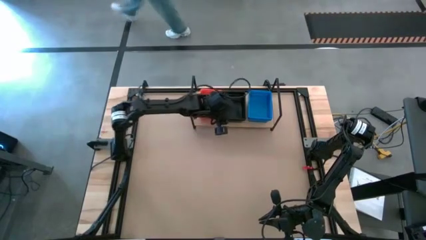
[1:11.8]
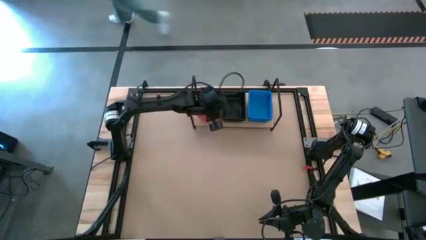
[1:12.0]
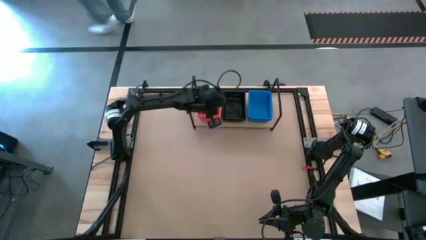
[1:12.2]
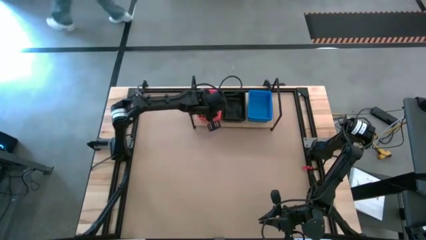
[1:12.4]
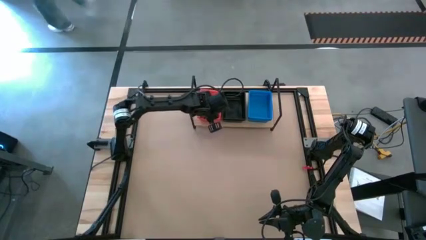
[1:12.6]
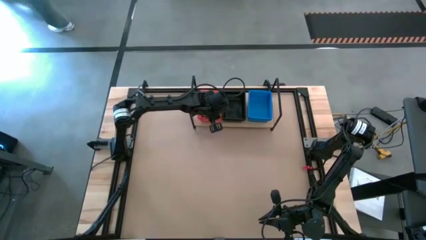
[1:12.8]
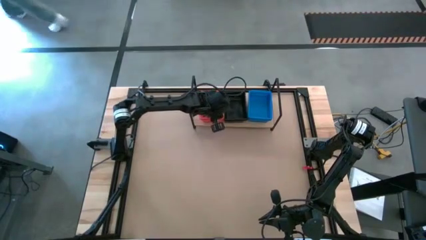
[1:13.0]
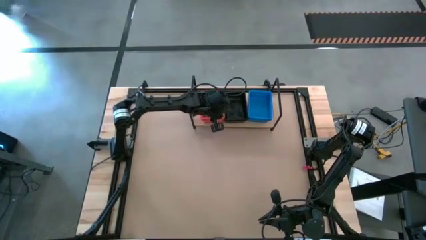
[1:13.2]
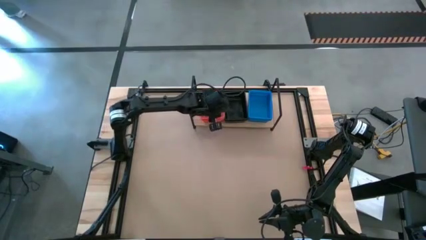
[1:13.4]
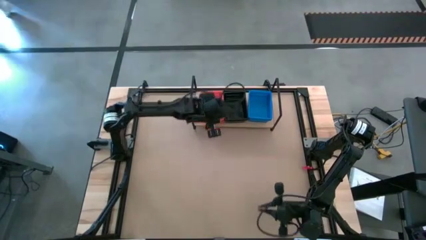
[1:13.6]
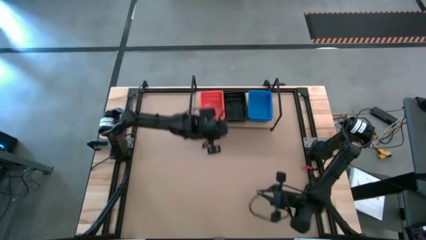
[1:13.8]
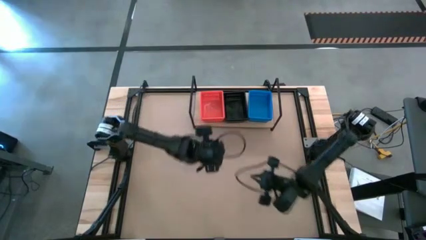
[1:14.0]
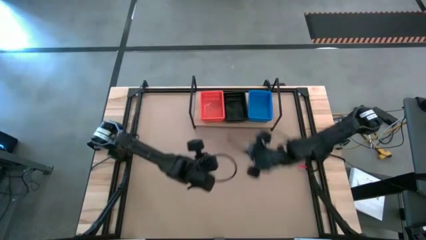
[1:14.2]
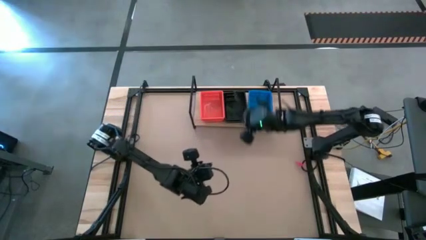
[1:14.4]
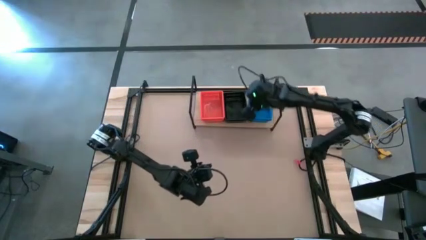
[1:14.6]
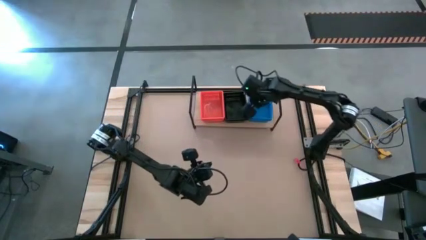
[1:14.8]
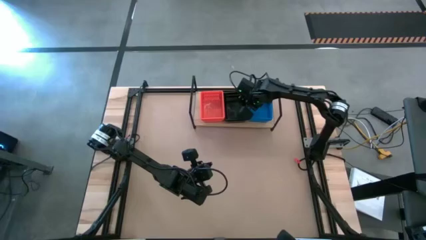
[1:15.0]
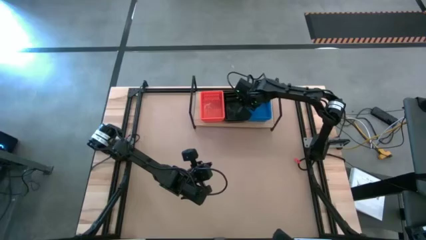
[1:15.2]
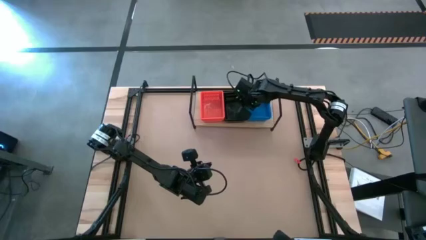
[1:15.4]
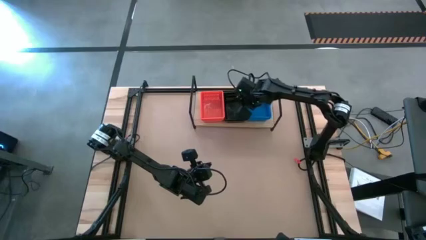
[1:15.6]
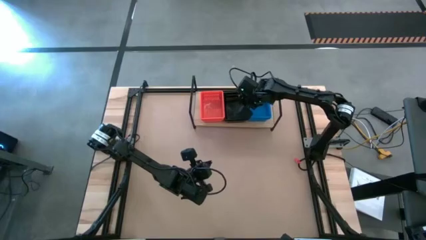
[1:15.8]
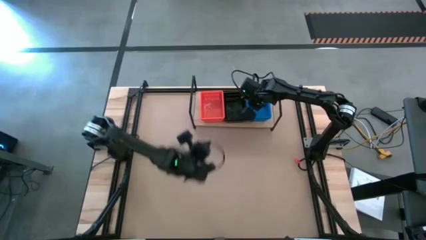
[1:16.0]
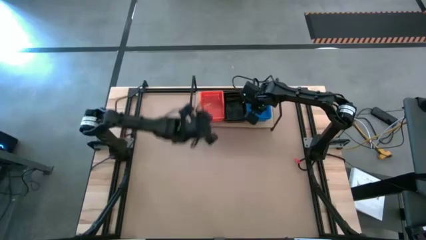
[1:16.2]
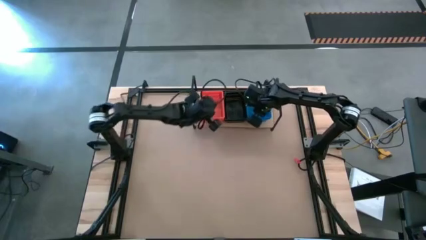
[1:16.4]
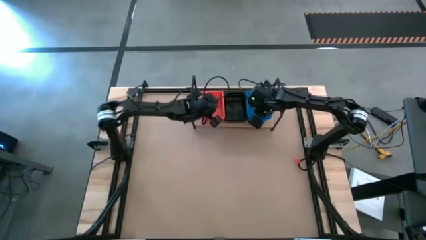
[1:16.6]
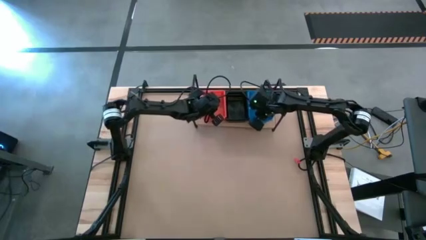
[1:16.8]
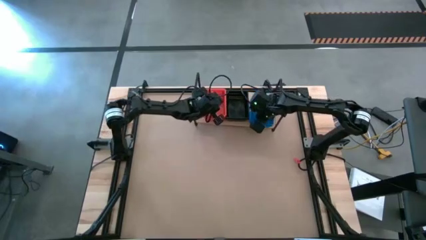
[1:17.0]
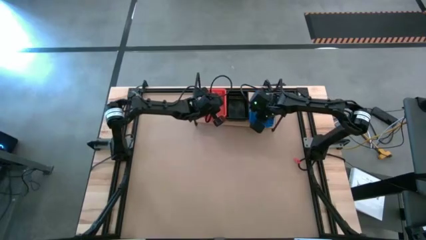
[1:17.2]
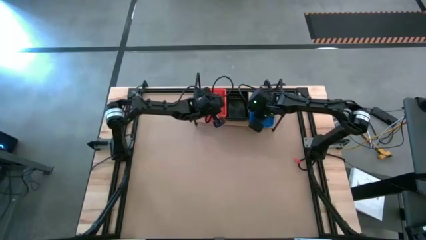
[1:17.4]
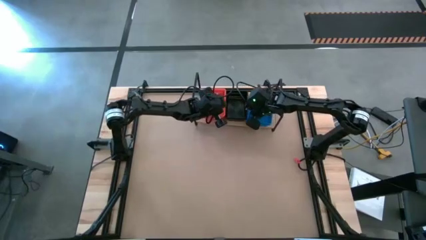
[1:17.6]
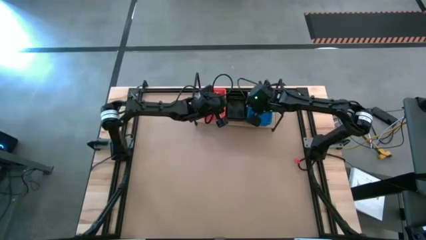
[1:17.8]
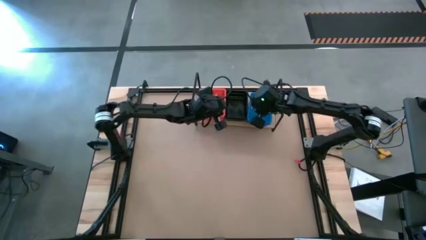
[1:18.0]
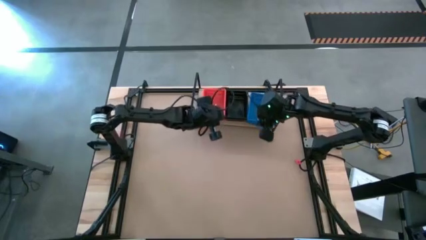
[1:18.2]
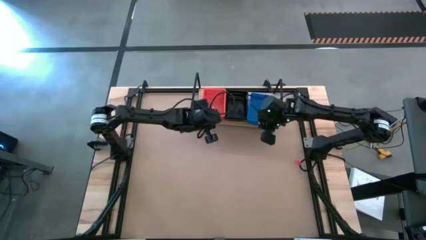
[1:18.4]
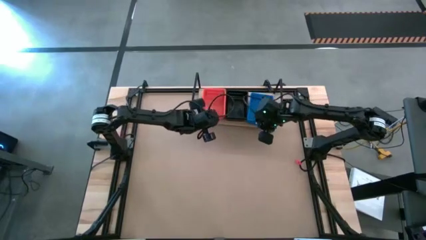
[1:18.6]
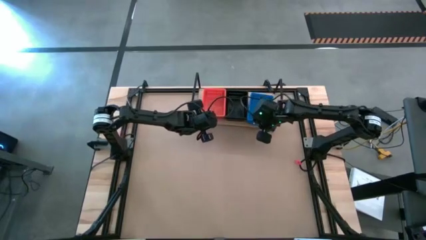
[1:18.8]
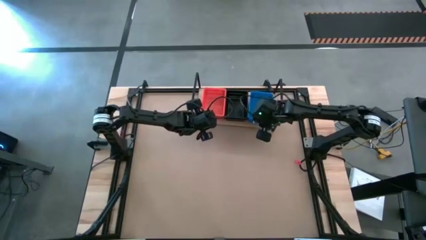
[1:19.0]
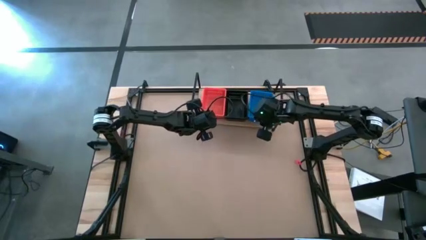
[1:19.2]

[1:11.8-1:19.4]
Task: Stack baskets on shelf by color
Adjust the stacked bins on the shelf

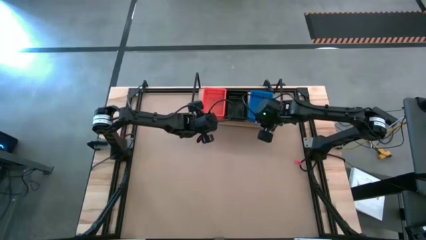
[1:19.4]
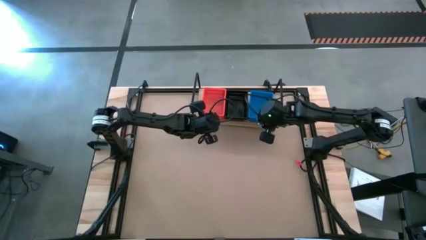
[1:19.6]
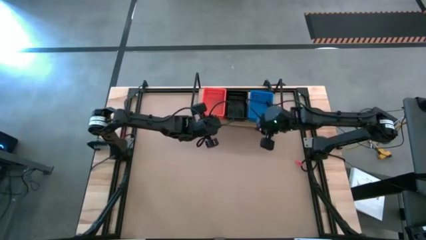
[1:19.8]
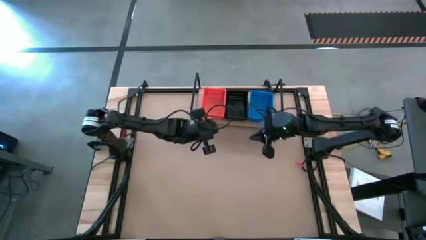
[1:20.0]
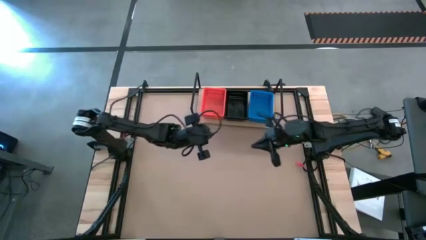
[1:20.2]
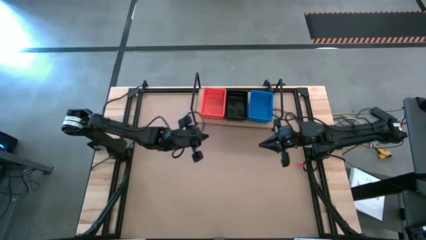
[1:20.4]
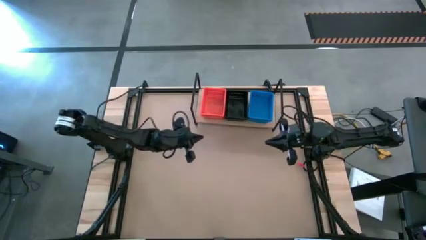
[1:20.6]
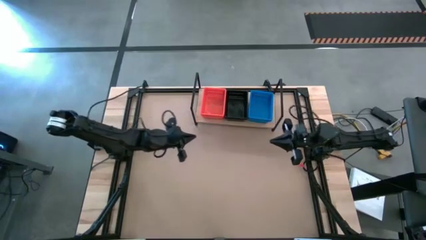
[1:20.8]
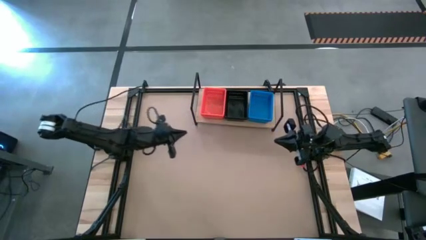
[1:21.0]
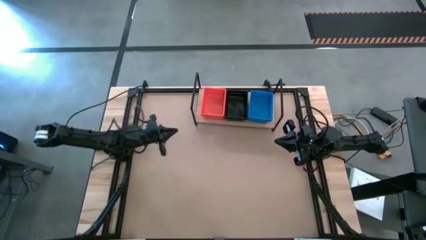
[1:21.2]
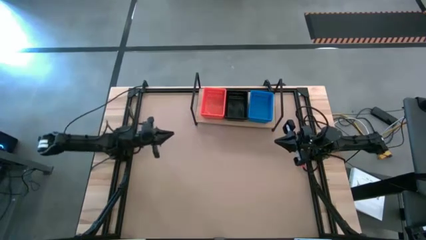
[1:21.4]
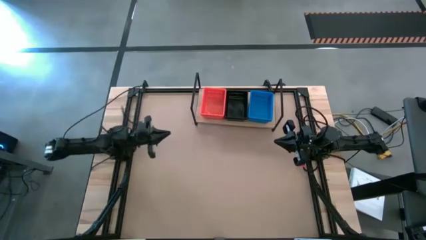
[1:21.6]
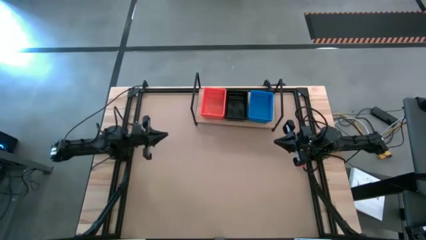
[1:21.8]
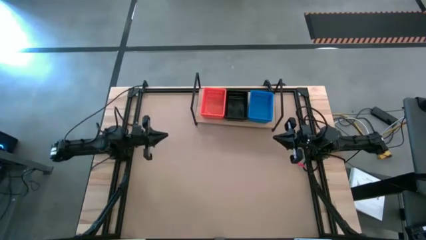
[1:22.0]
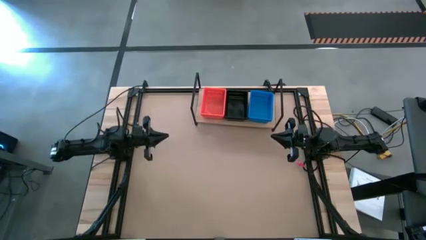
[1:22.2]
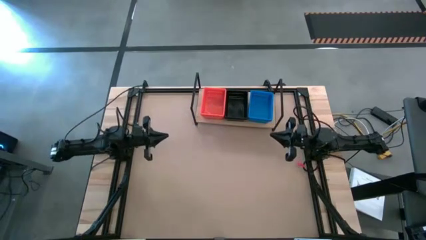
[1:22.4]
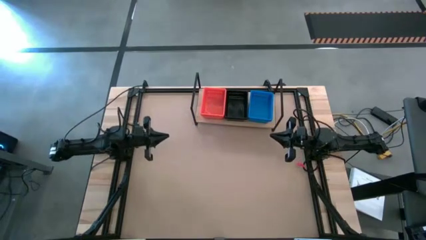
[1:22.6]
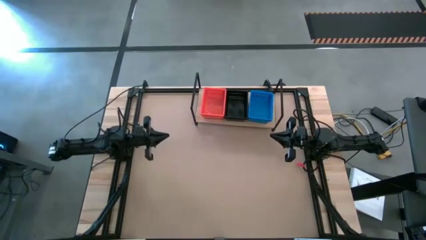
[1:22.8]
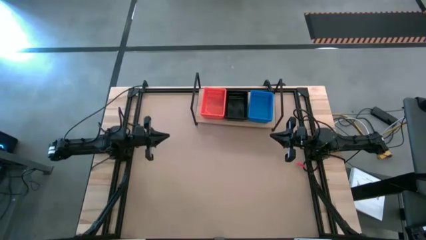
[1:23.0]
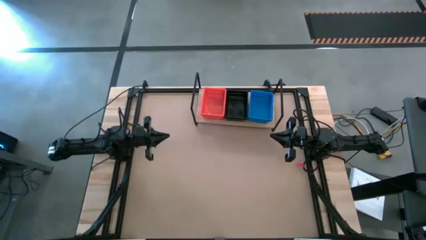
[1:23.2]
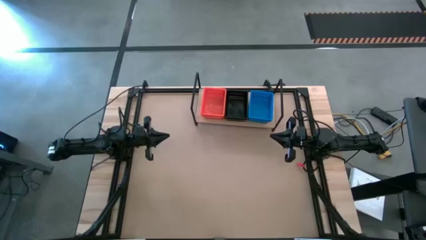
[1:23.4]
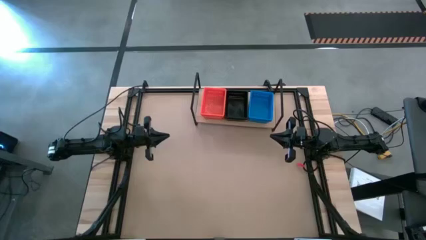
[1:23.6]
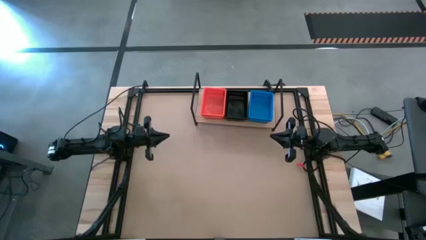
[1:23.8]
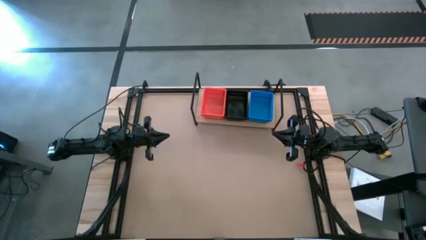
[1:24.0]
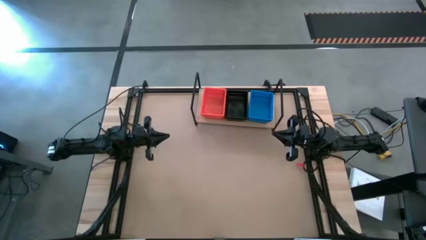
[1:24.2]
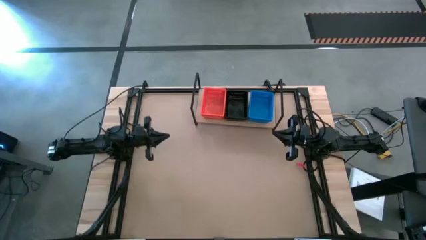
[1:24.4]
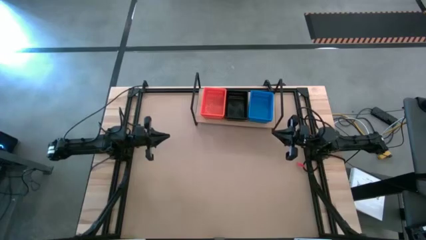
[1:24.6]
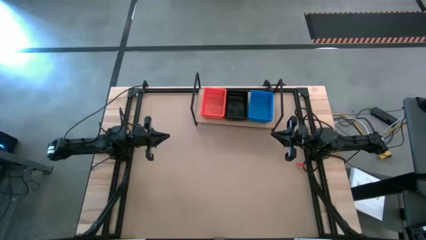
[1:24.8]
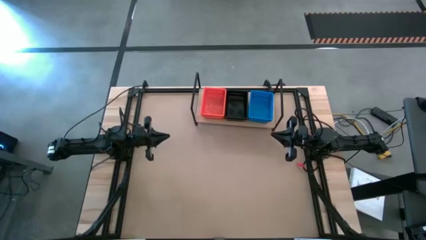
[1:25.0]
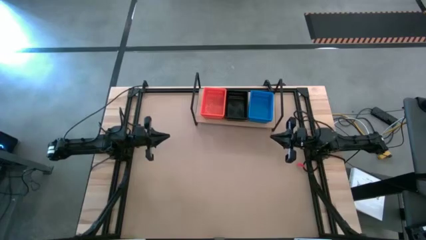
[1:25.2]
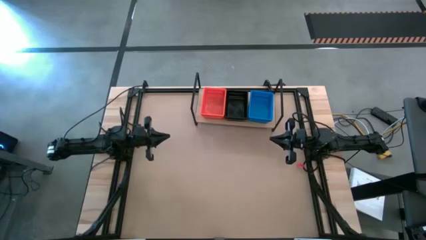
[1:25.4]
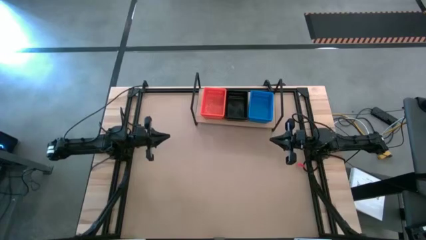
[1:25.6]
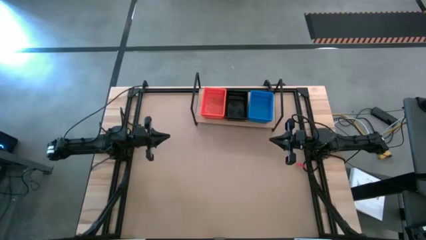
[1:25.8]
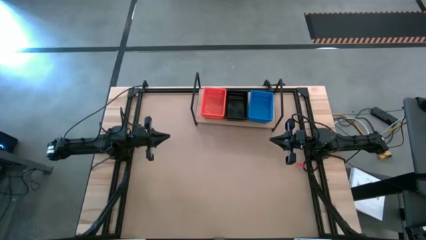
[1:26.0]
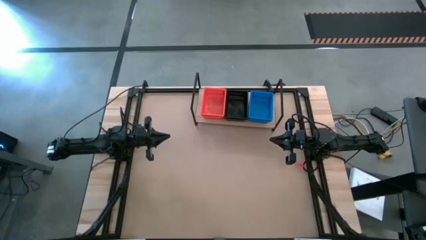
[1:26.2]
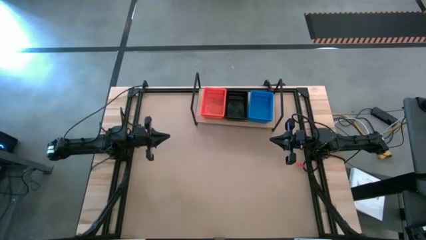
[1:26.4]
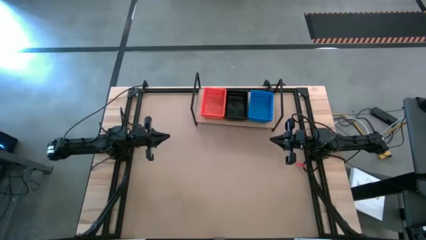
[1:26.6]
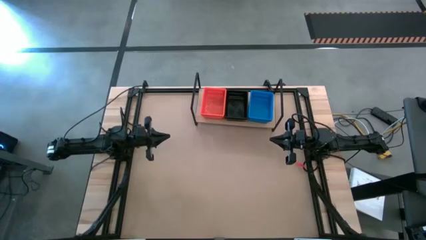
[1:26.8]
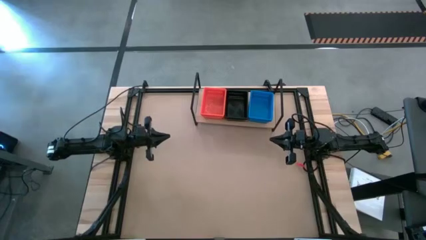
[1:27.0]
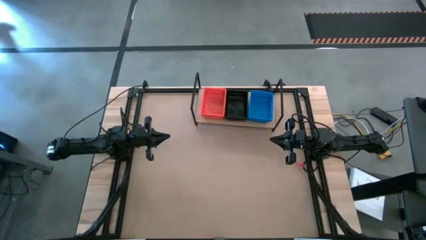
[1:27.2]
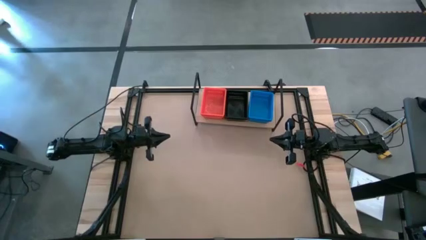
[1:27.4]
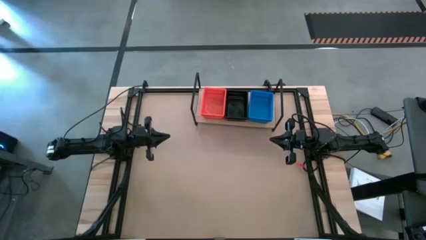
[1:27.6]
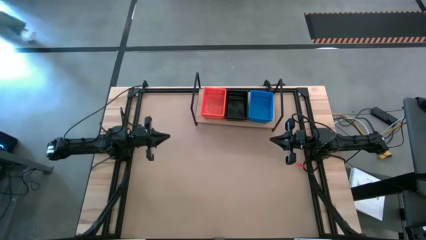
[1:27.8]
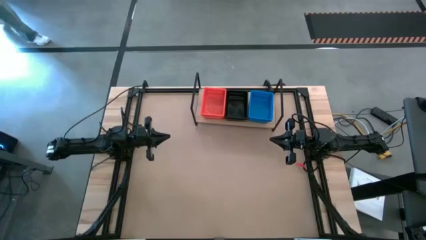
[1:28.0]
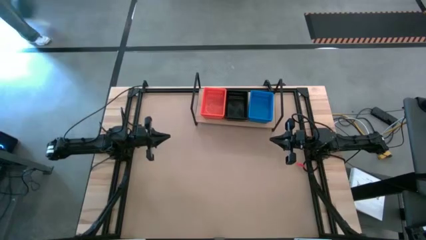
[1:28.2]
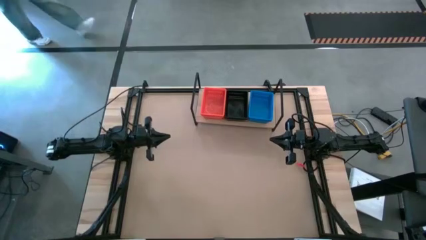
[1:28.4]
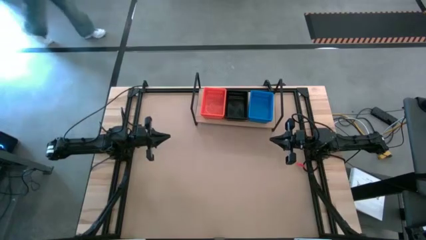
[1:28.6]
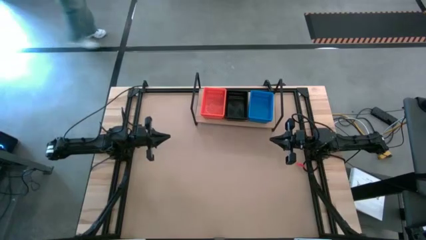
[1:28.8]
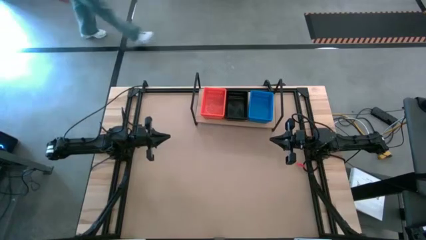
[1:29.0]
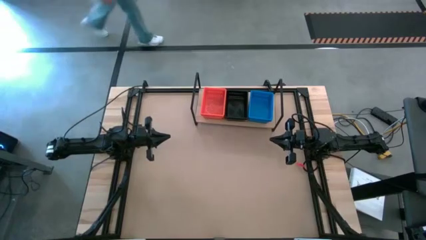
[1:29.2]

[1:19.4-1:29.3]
Return to Home Position
